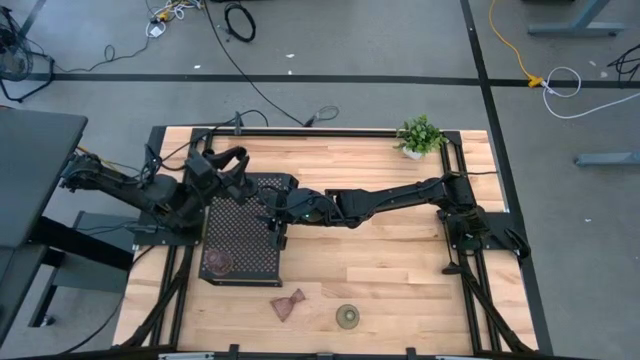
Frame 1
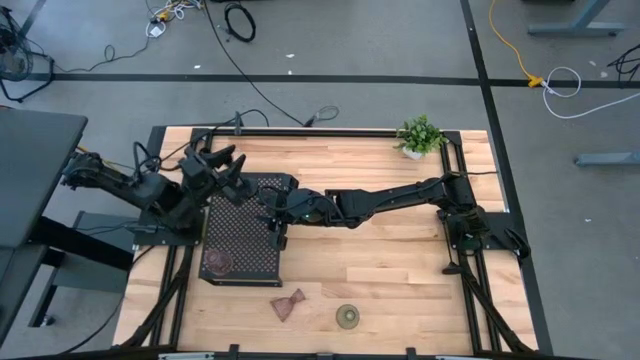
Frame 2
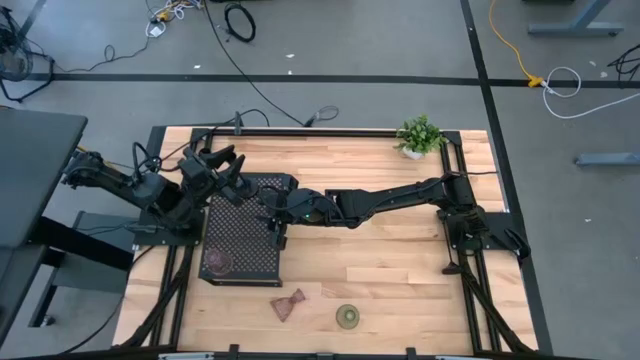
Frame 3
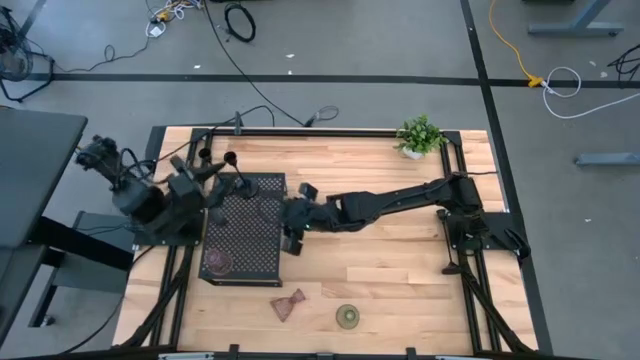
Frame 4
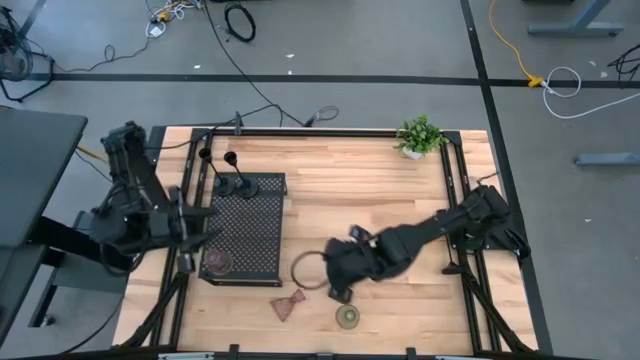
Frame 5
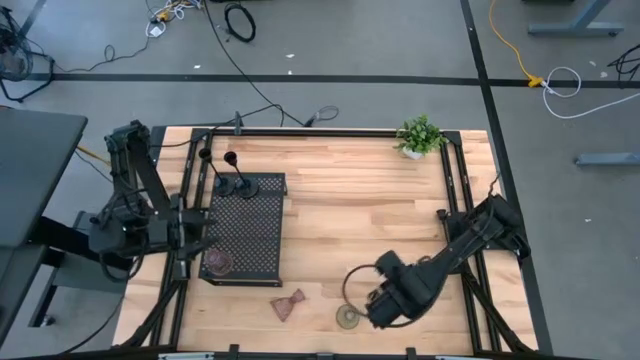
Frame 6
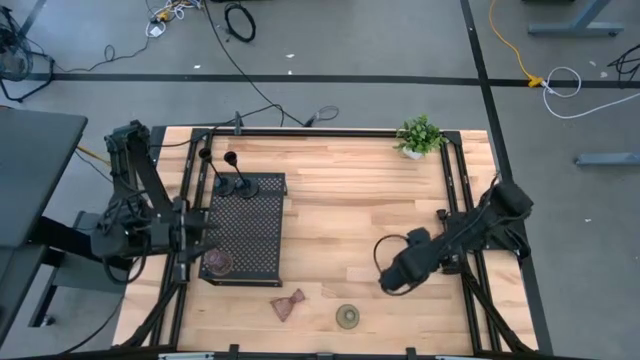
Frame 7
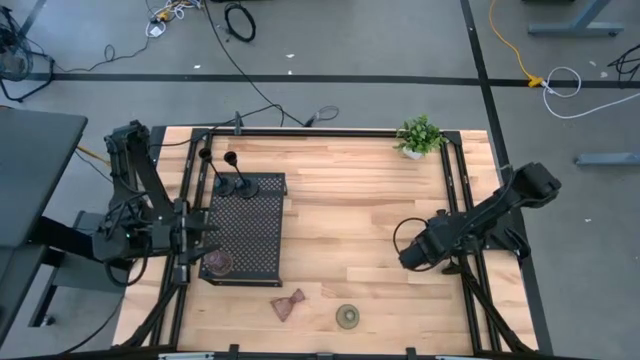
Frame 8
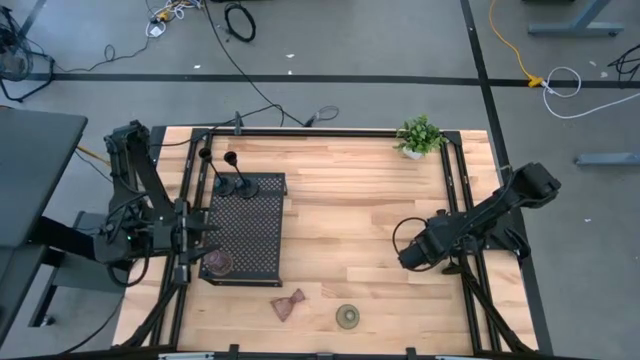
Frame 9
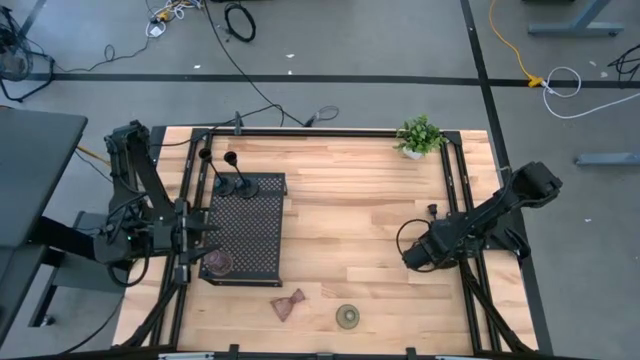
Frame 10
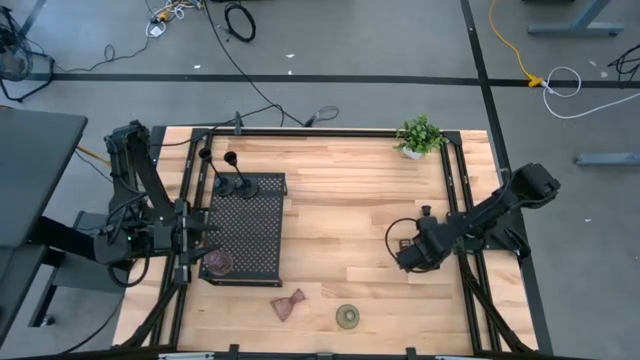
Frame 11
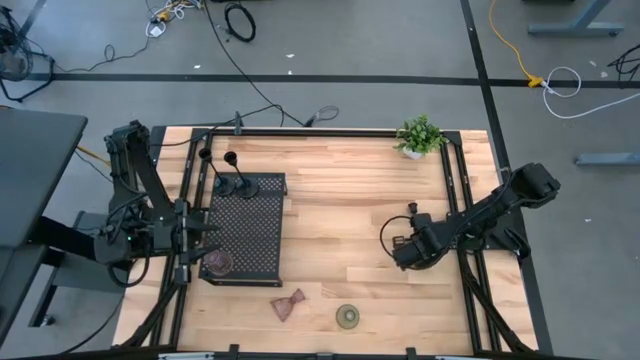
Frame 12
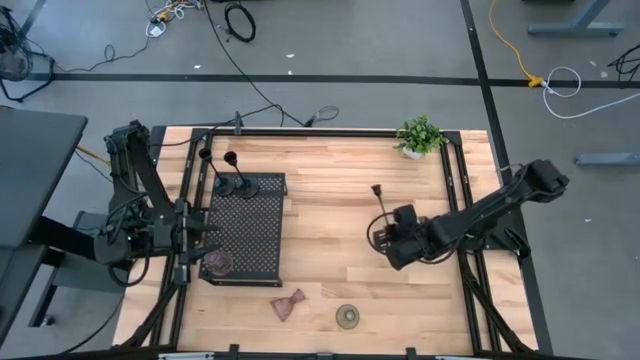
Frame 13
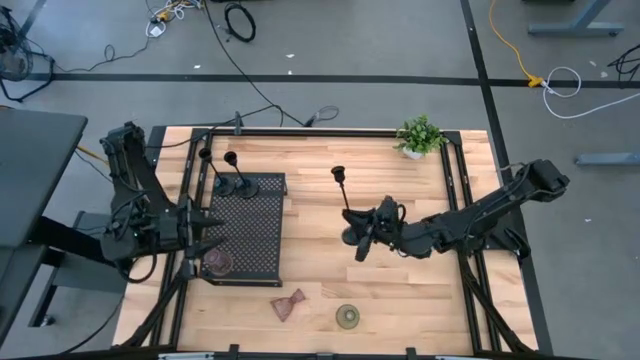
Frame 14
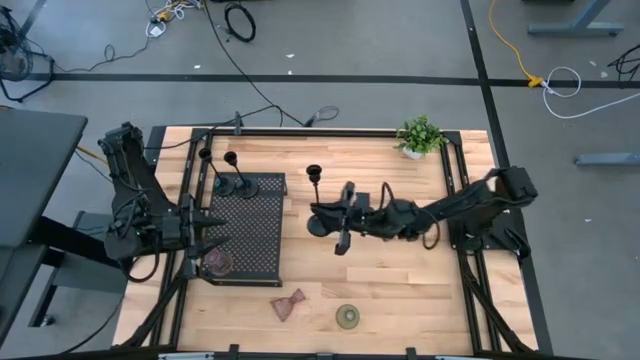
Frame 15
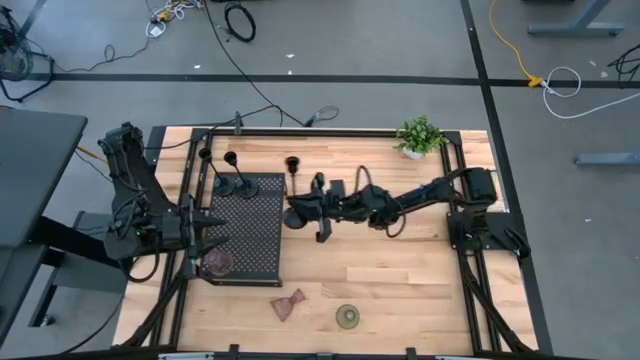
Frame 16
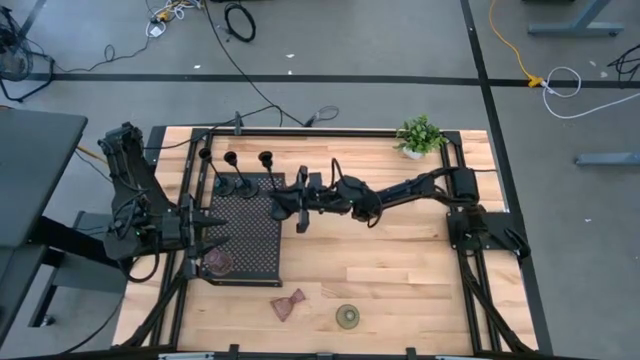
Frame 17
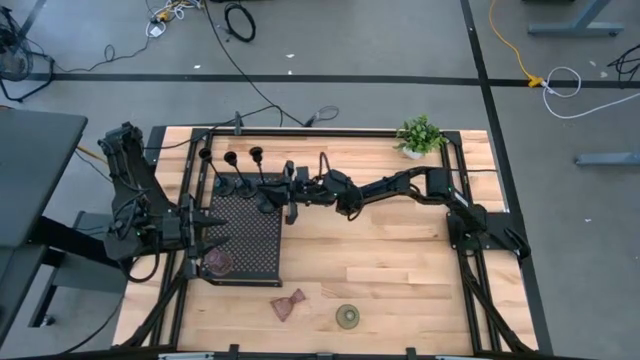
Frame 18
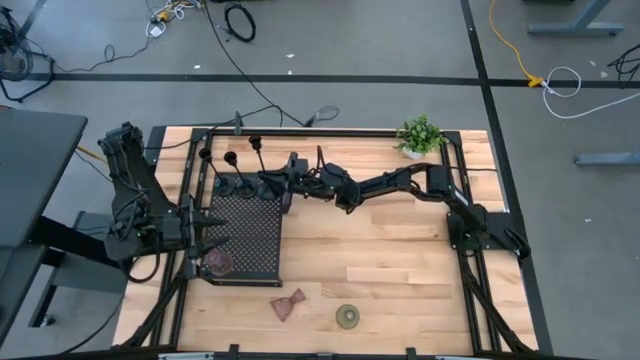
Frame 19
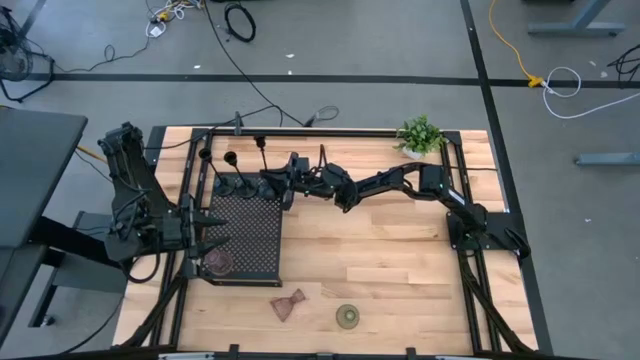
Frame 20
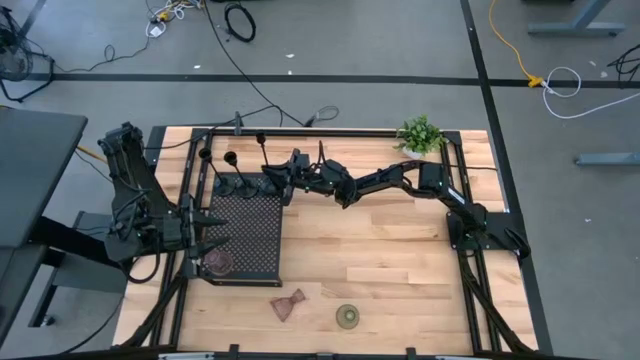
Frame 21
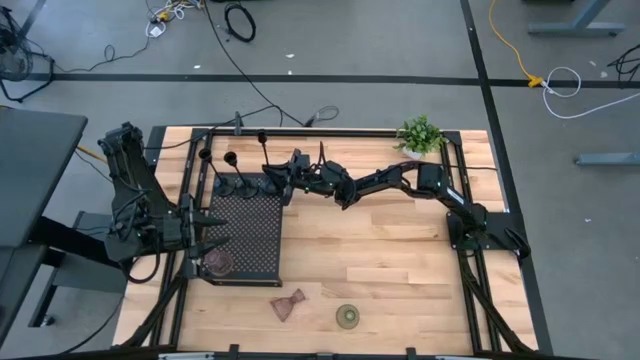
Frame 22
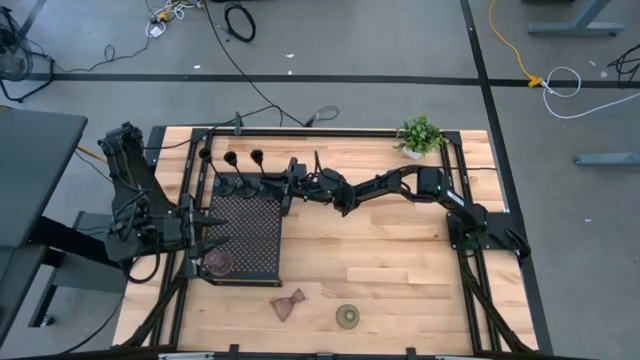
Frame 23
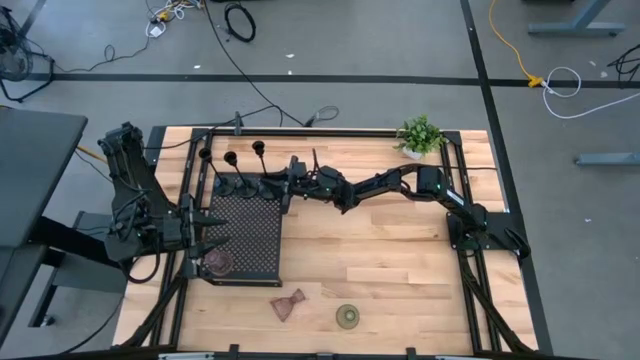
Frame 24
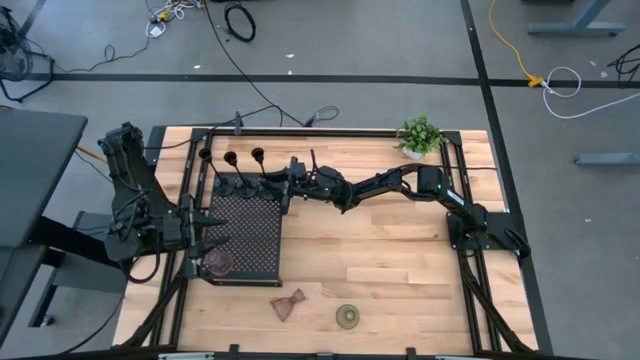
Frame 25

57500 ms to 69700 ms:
Task: Pick & Place candle stick holders
Put the black candle holder on the shelf aligned with the other black candle holders

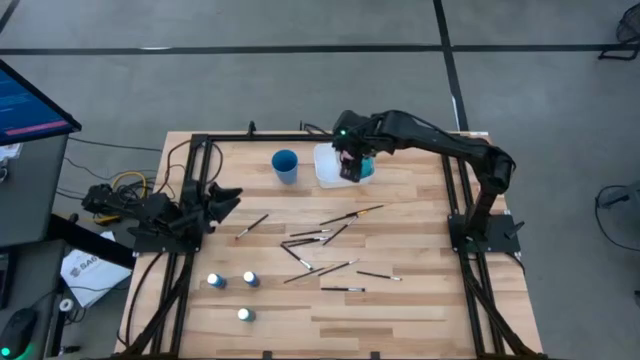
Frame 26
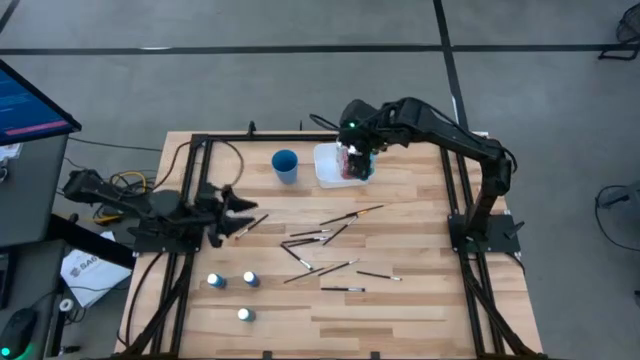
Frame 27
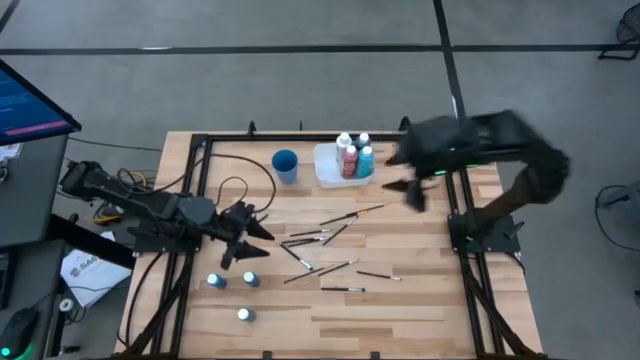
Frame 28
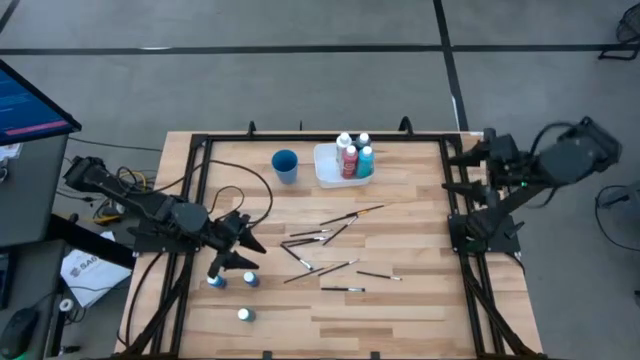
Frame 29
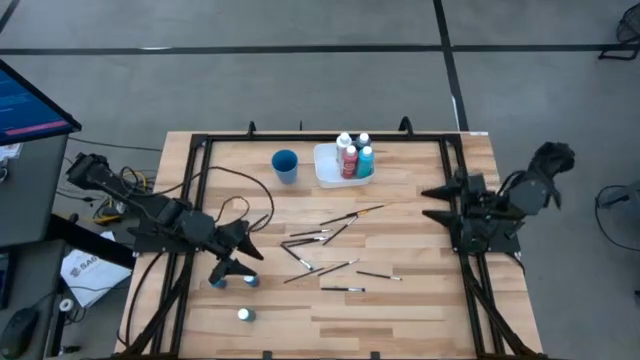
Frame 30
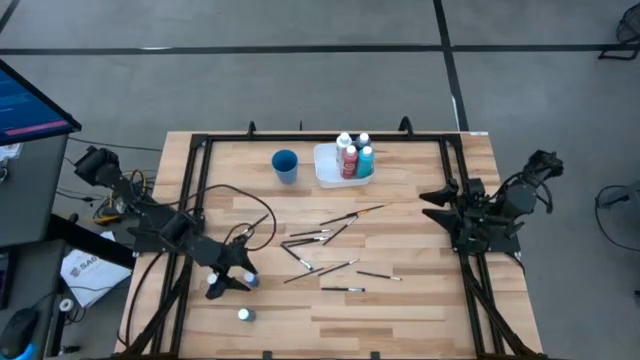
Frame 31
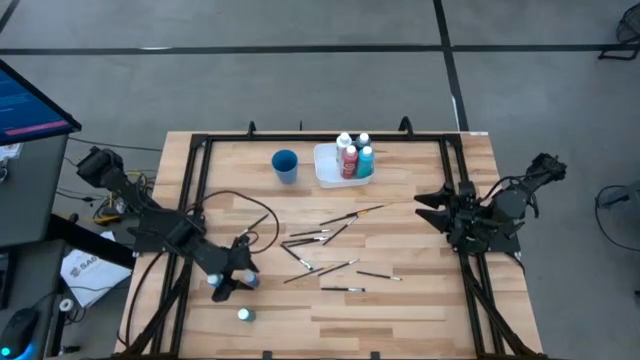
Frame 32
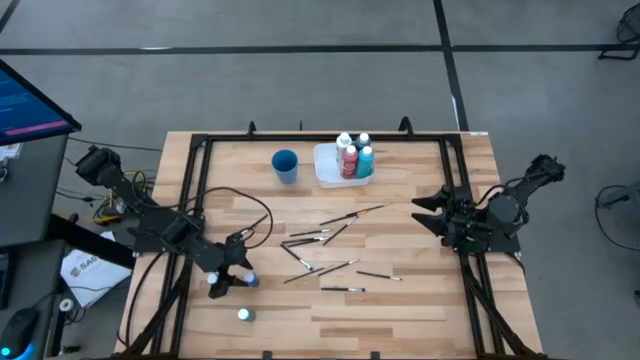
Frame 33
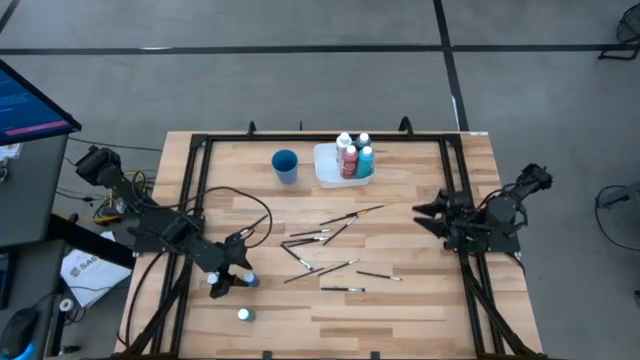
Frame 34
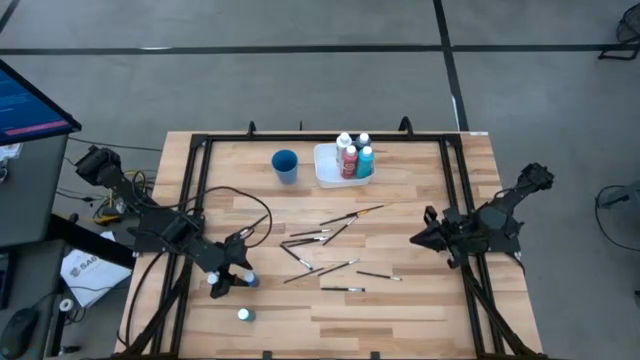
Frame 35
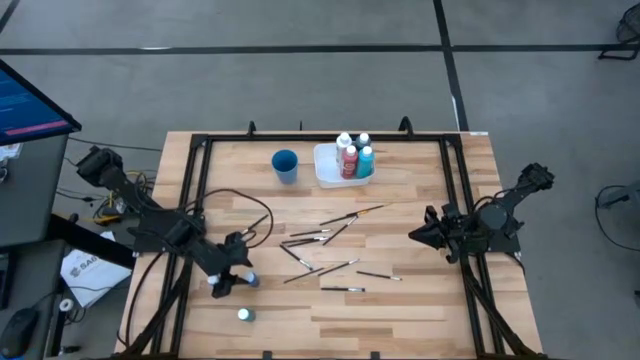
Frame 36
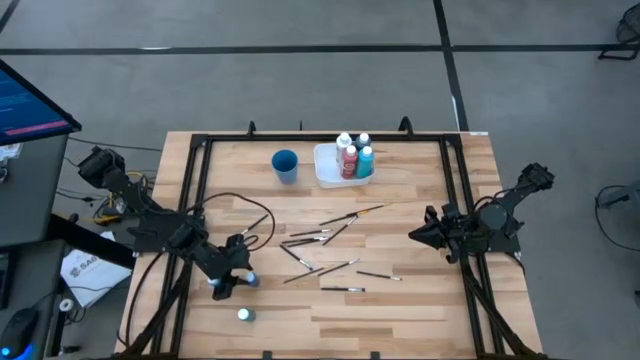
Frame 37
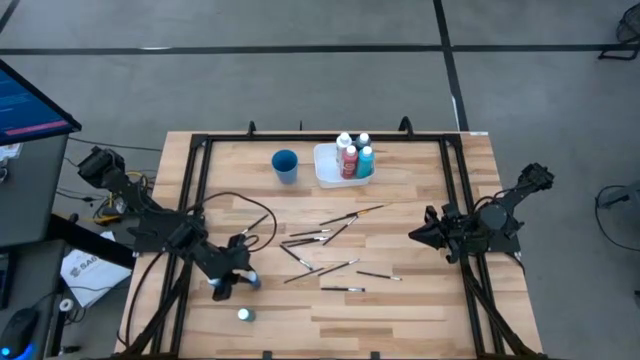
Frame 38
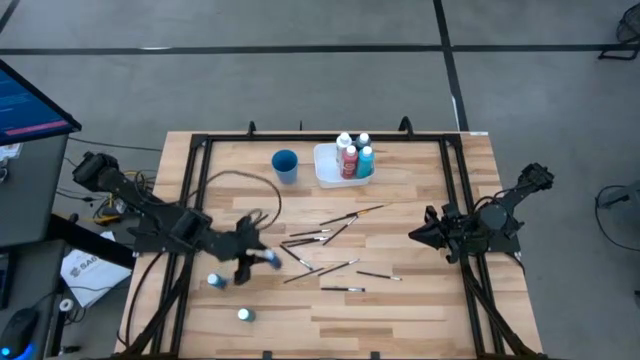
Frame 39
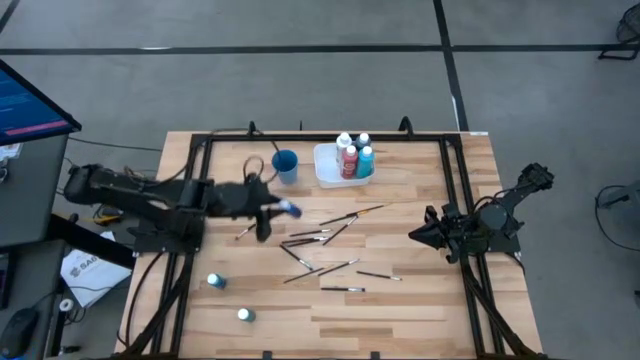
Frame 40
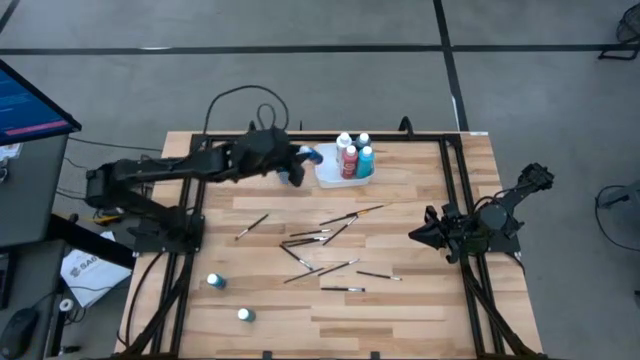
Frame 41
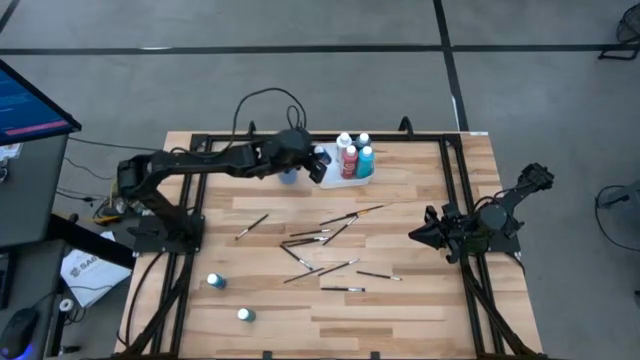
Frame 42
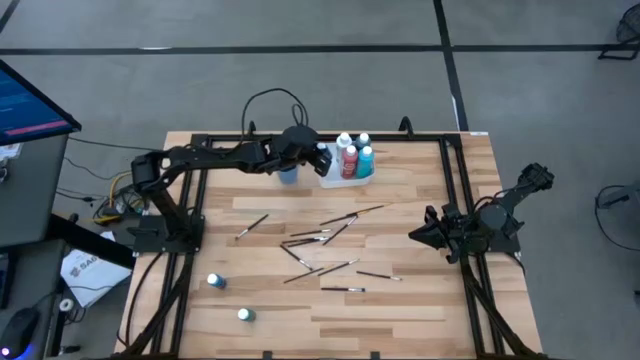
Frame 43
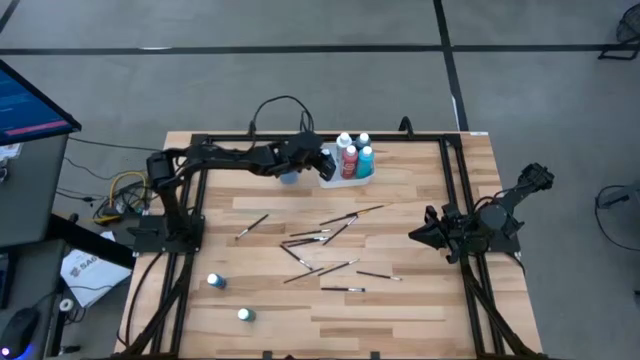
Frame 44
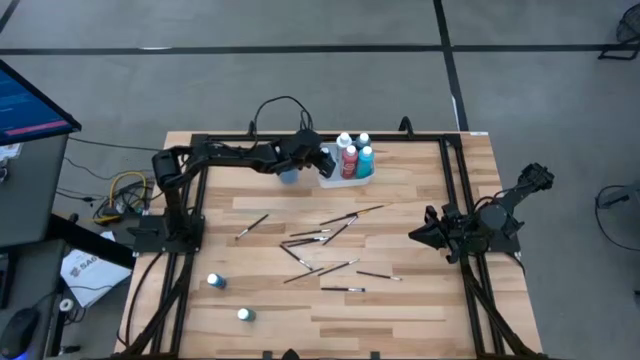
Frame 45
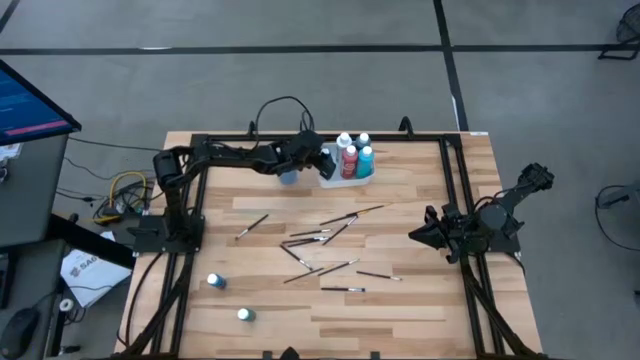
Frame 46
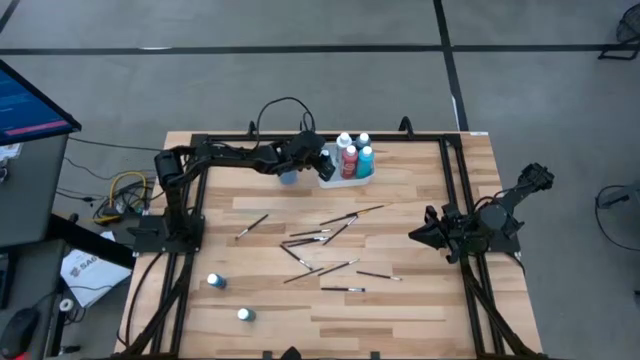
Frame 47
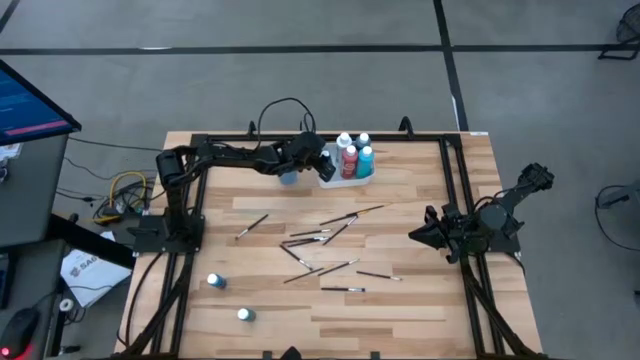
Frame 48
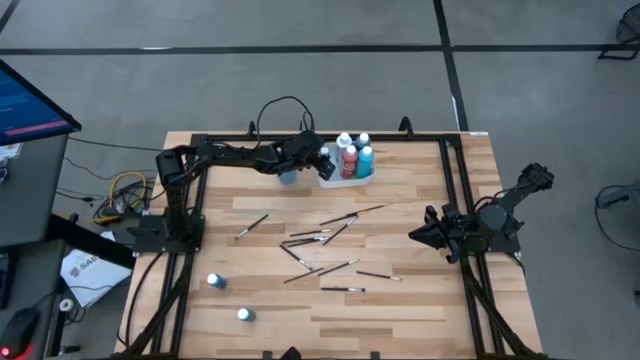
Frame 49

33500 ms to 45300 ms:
Task: Pick & Place Paint Supplies
Put the blue paint bottle into the white bin
